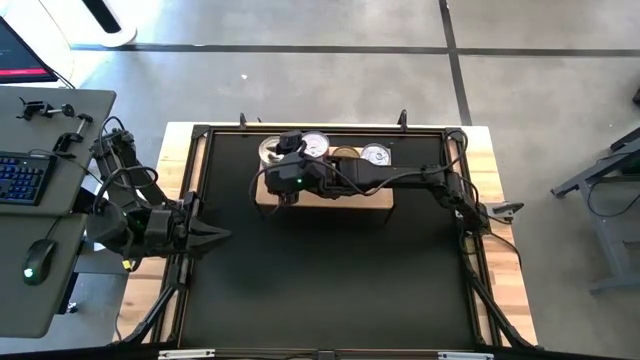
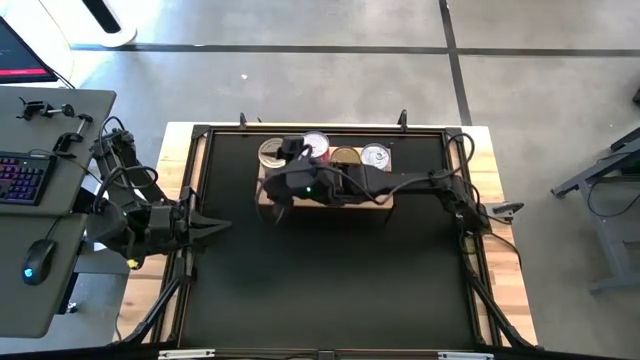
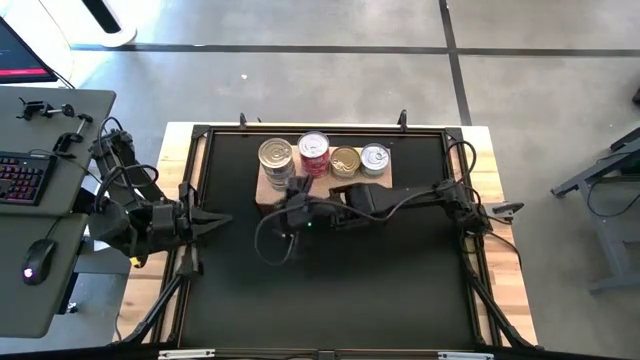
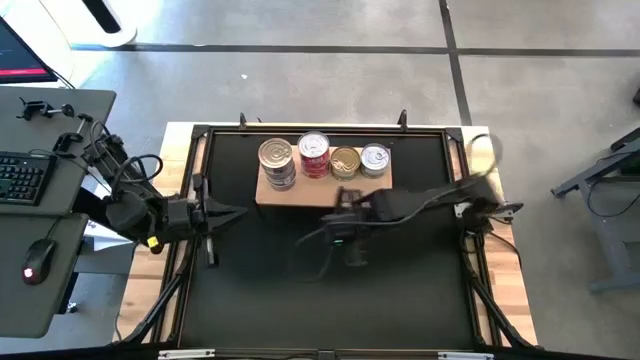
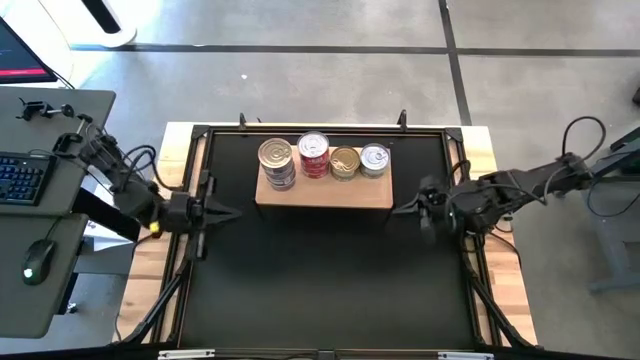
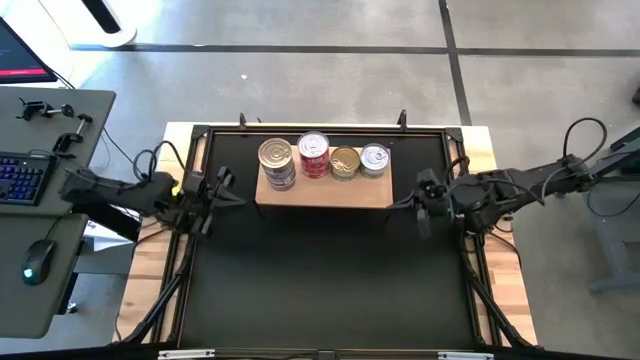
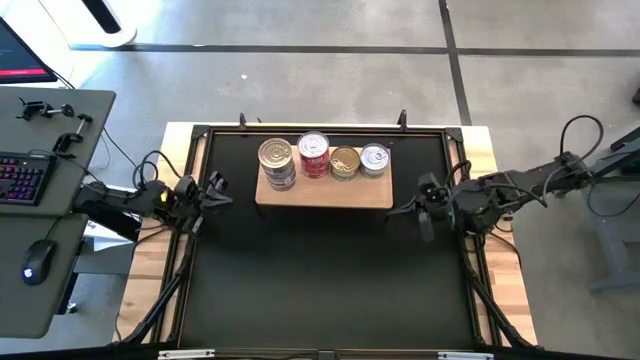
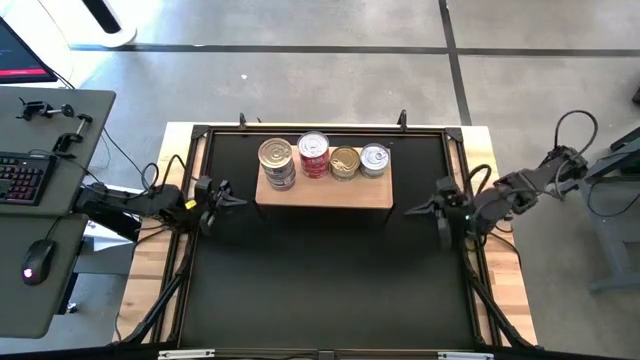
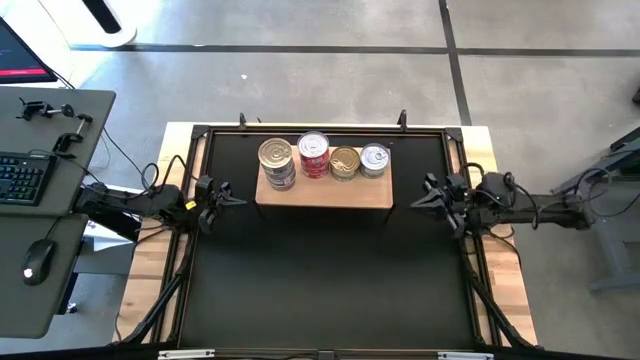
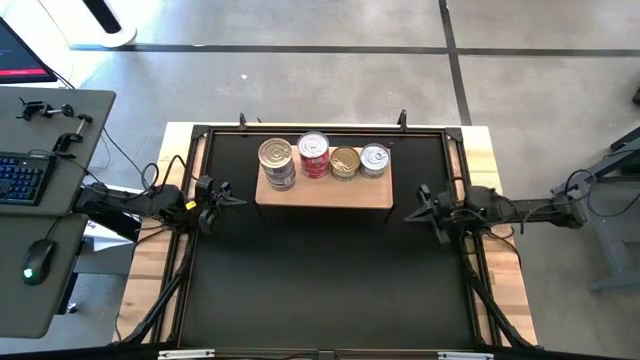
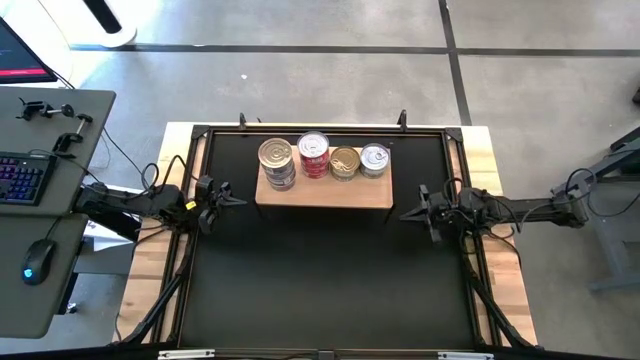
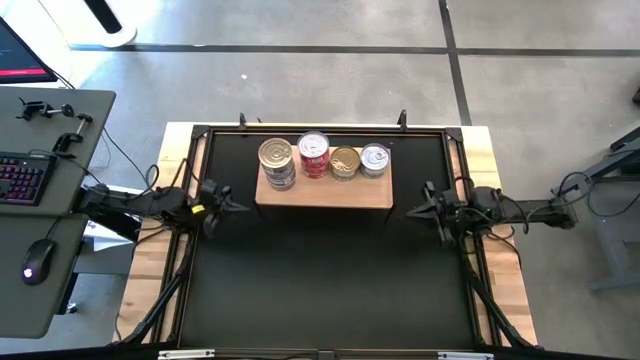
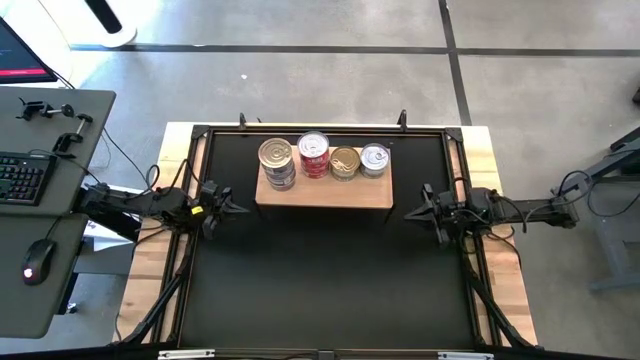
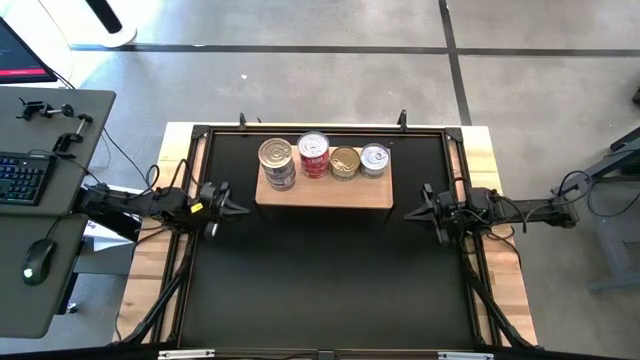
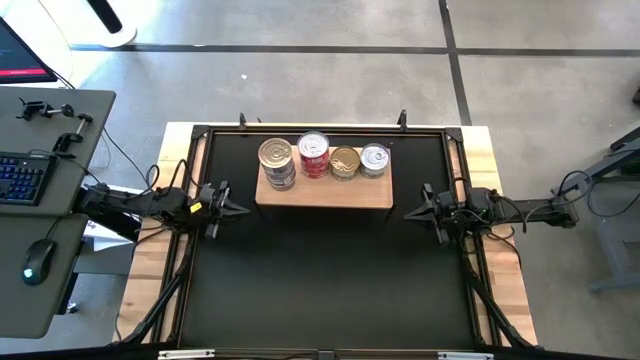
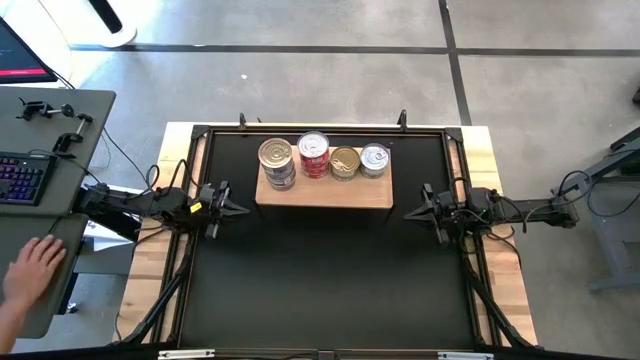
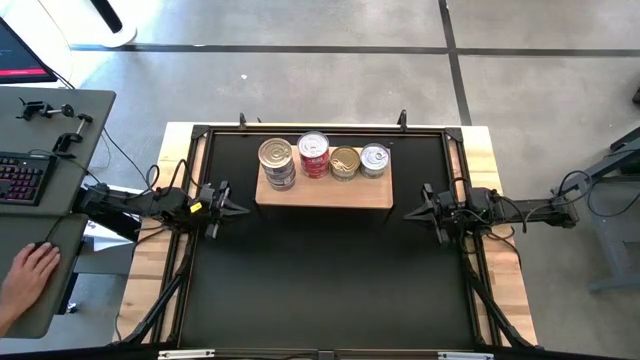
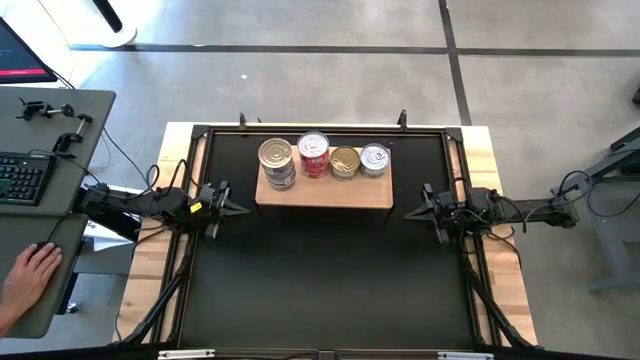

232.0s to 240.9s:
Task: Stack canned seafood by type on shelf
Return to Home Position

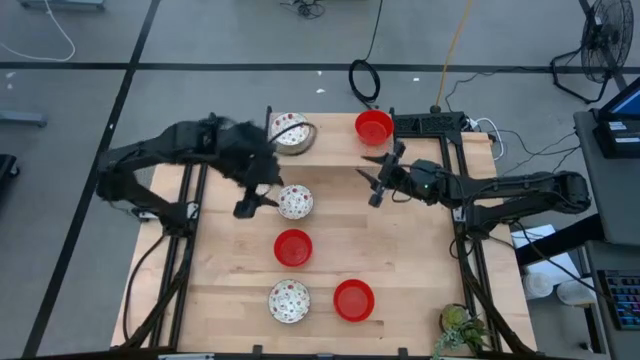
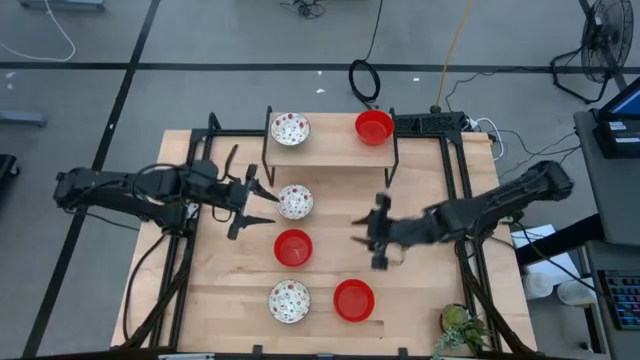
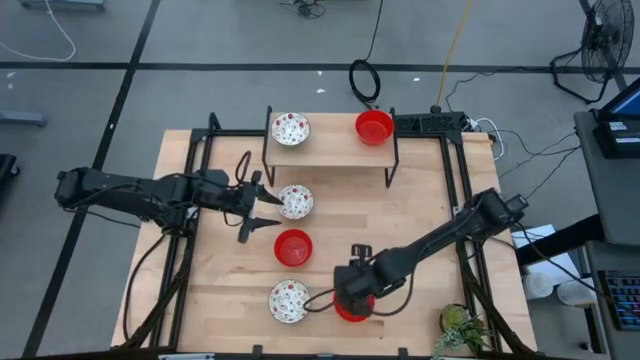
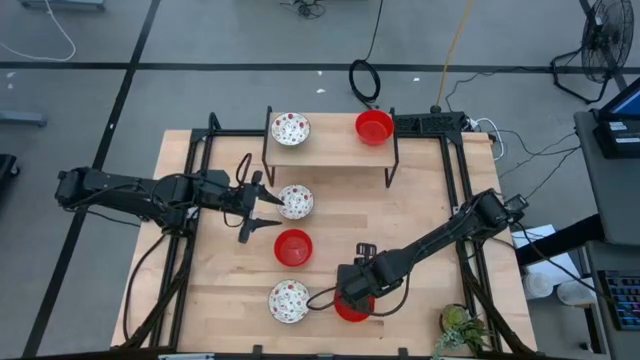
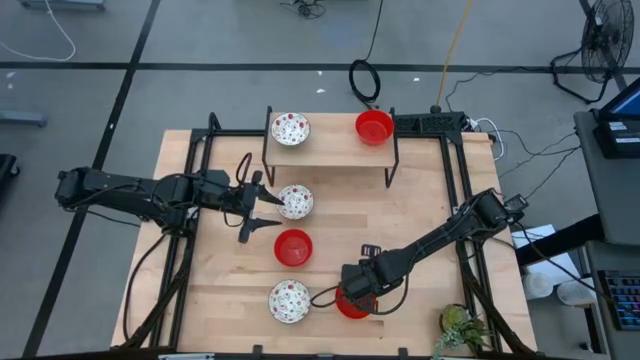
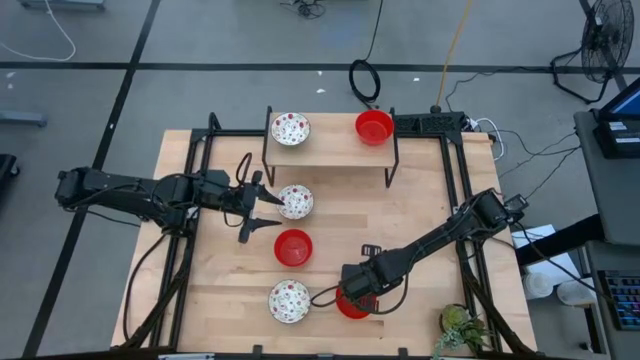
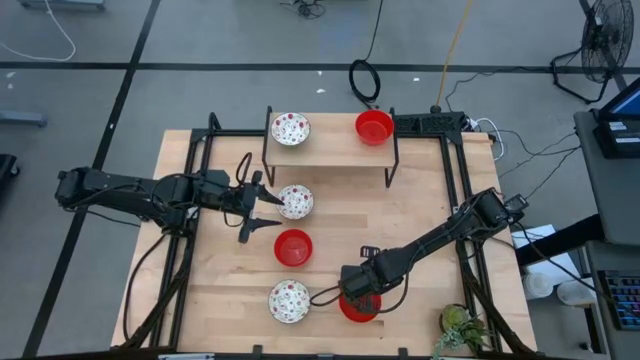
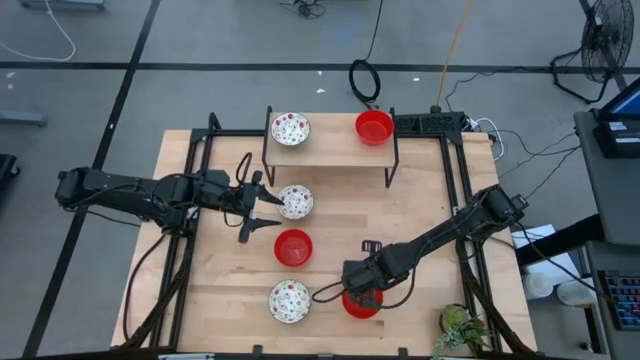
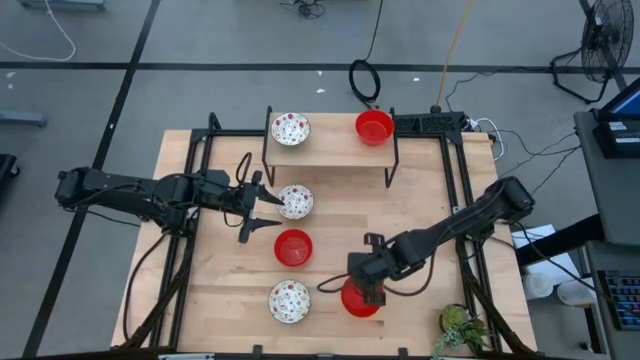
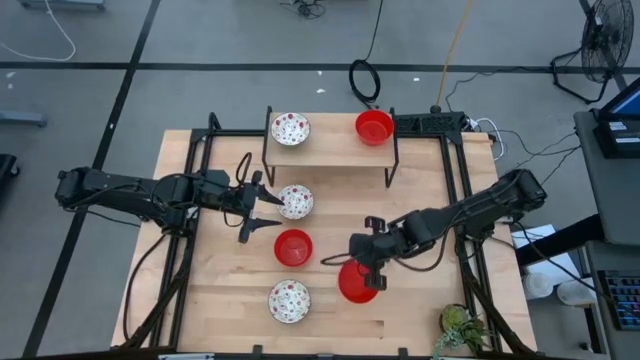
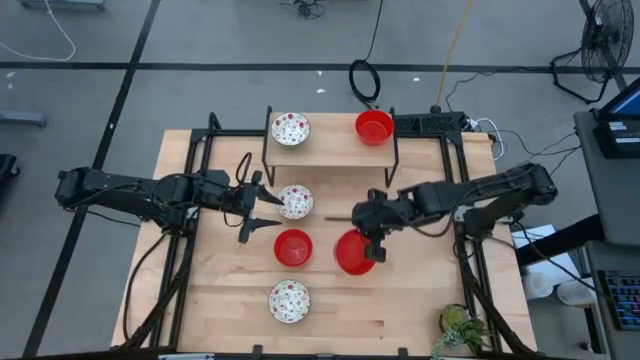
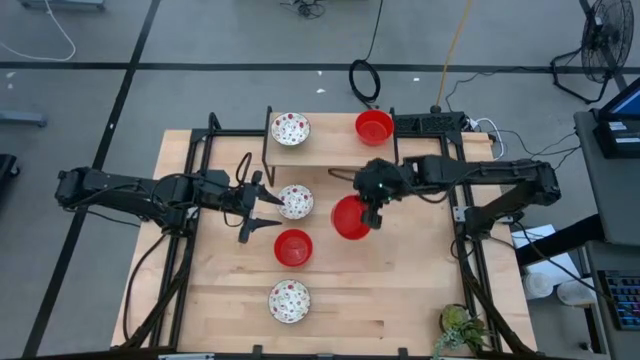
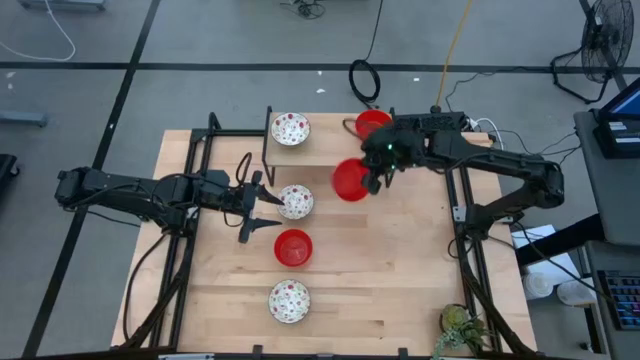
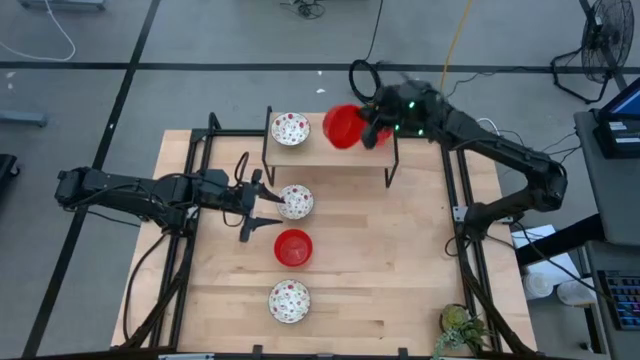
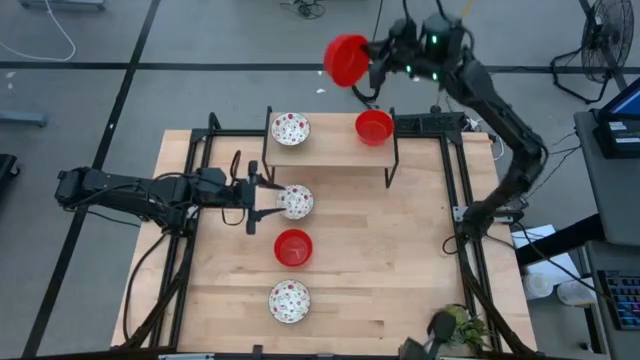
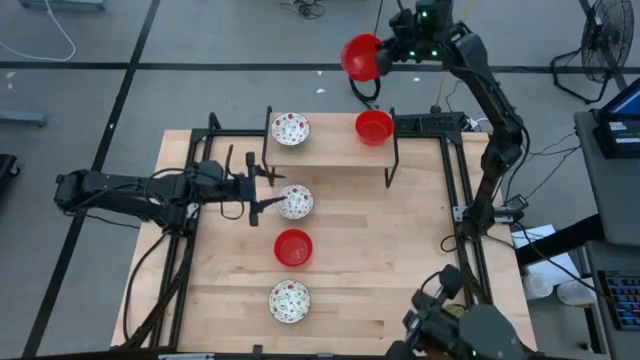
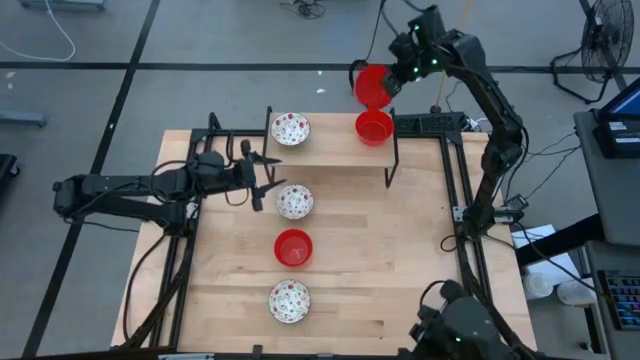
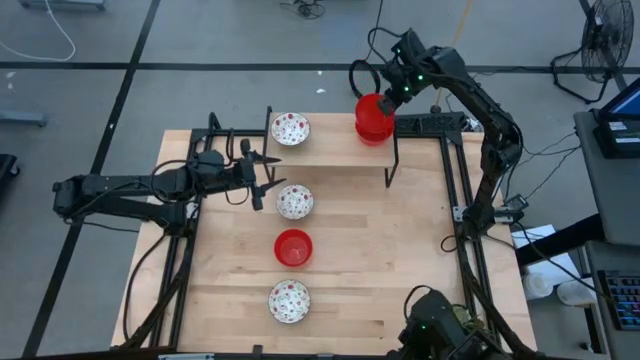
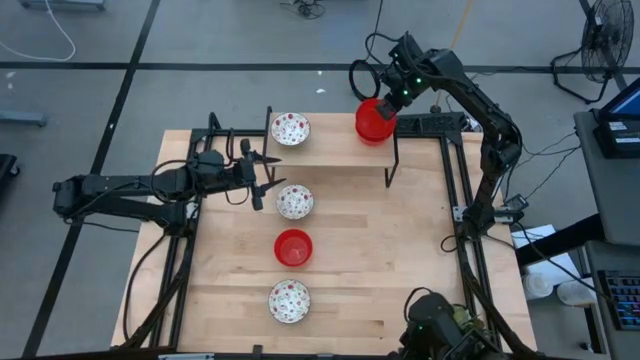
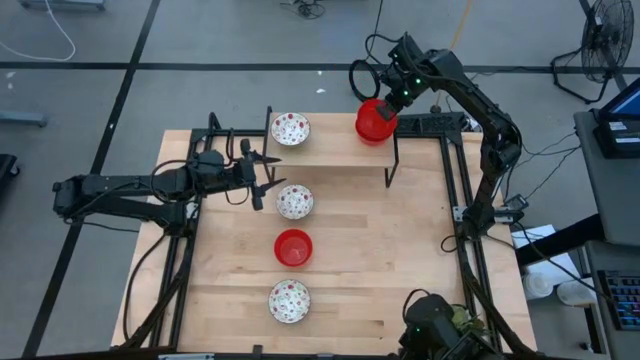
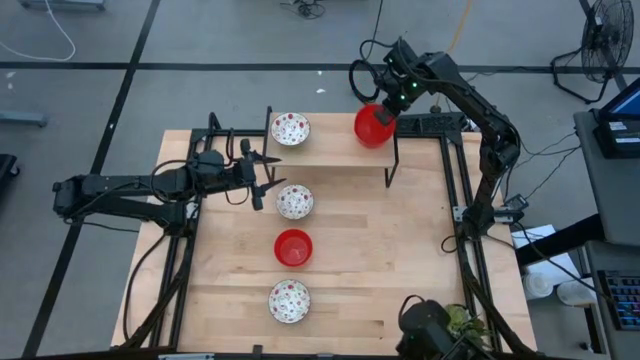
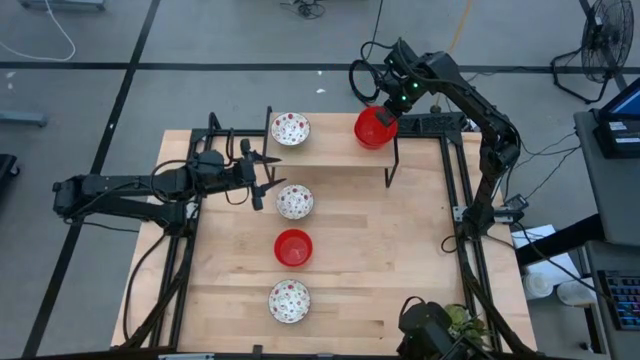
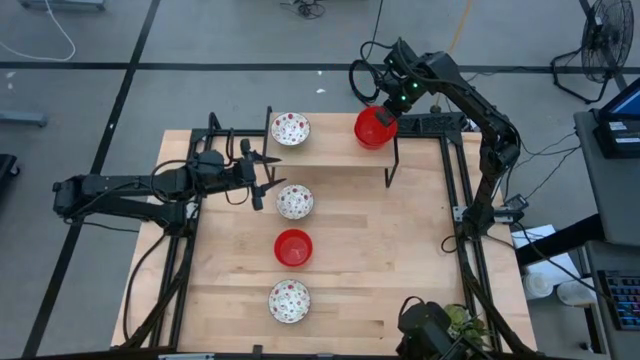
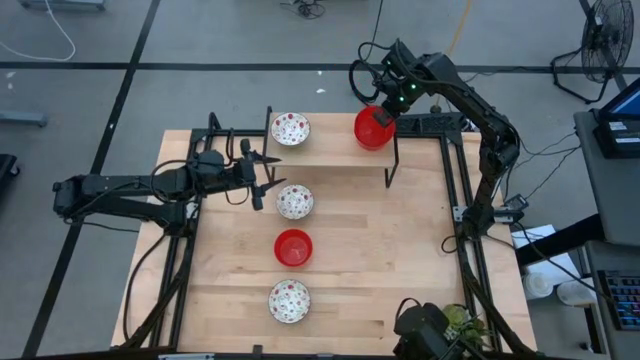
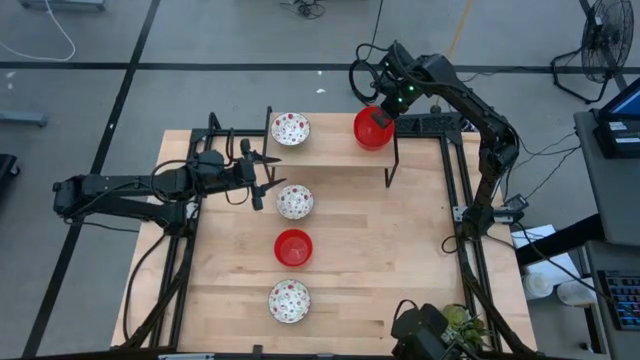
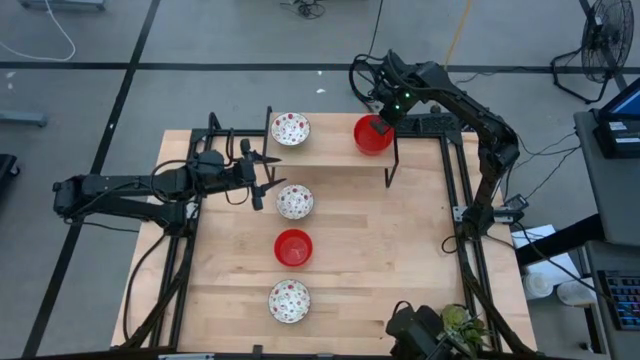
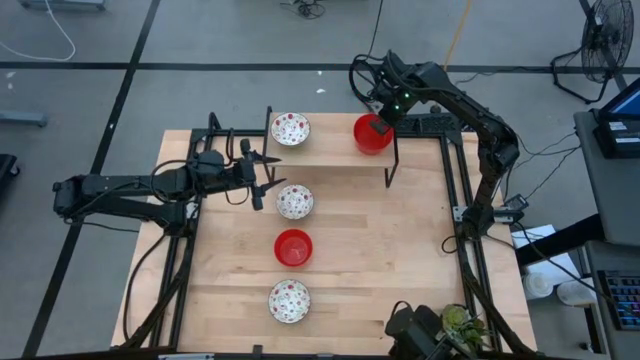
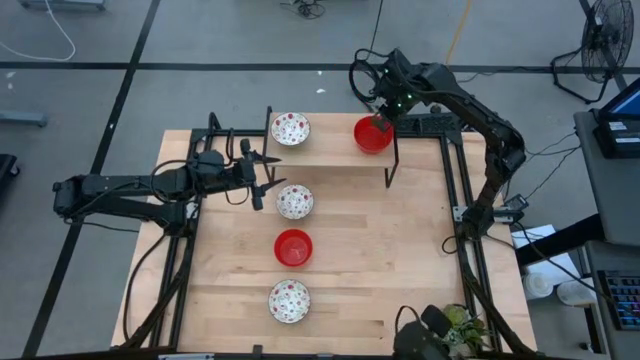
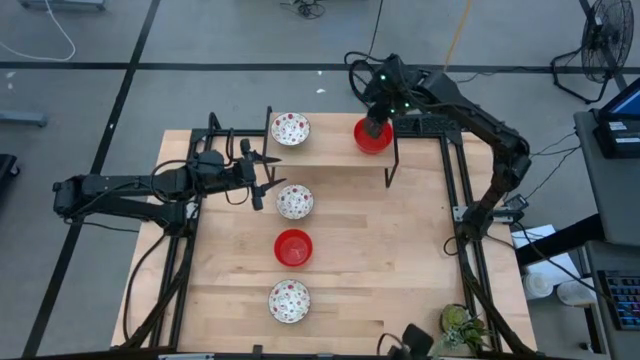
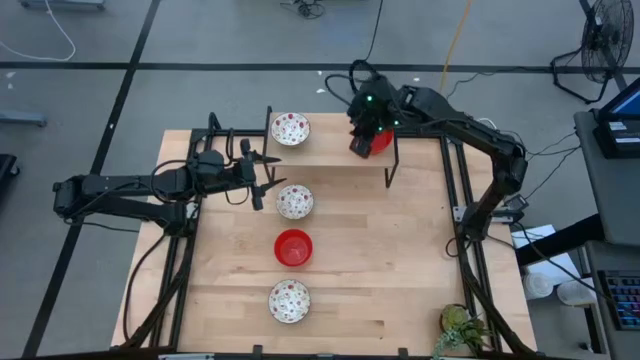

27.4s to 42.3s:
Task: Pick & Place Mini bowls
Stack the bottom red bowl on the red bowl on the shelf
